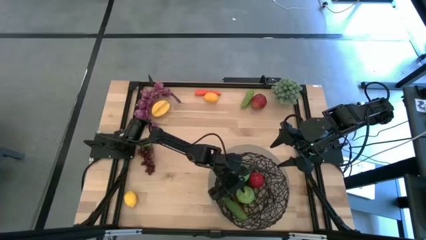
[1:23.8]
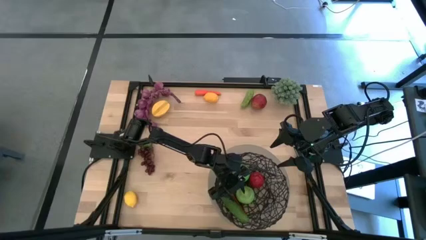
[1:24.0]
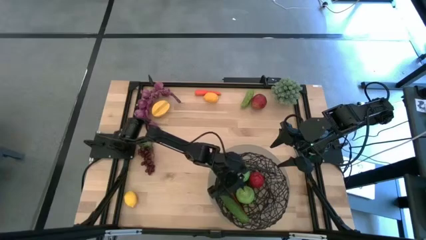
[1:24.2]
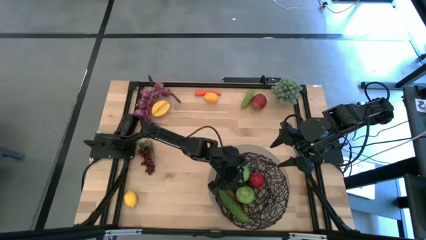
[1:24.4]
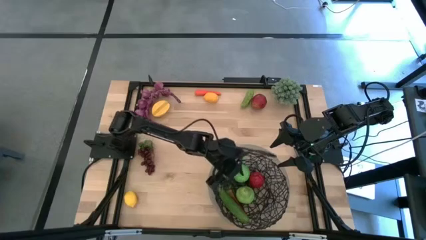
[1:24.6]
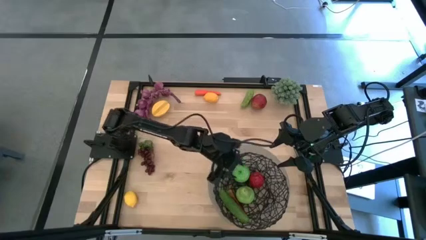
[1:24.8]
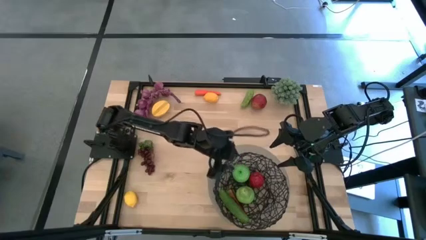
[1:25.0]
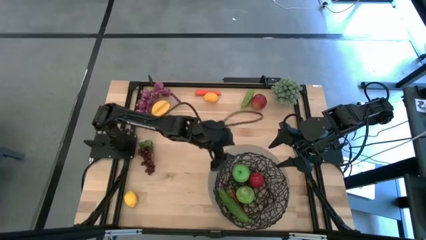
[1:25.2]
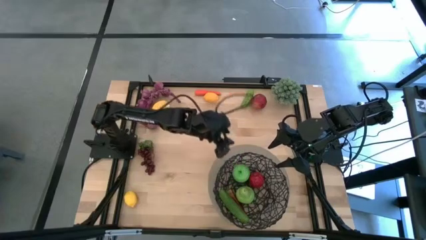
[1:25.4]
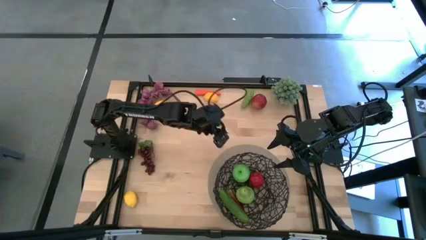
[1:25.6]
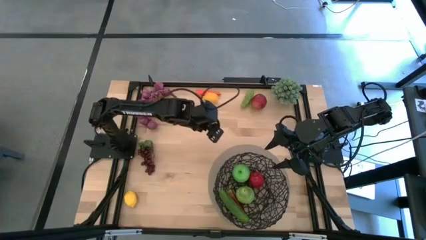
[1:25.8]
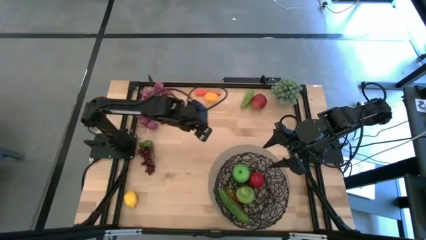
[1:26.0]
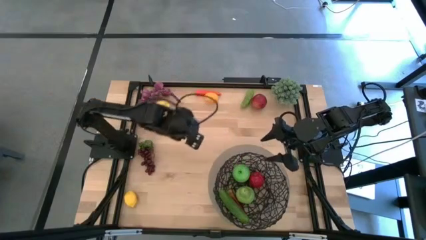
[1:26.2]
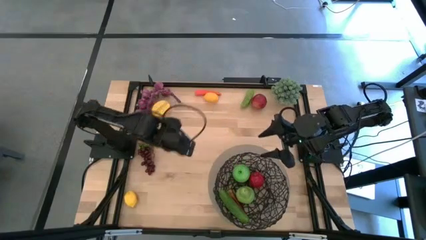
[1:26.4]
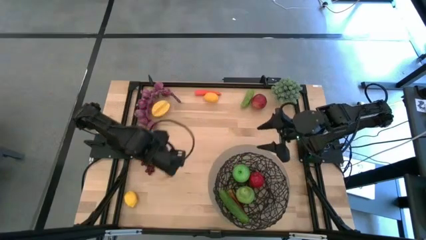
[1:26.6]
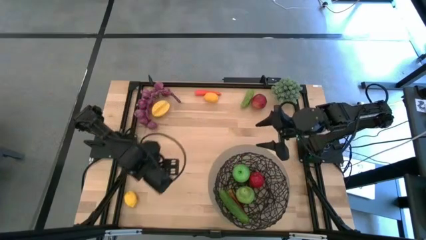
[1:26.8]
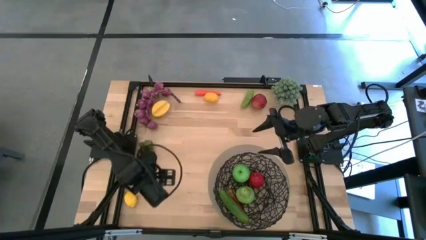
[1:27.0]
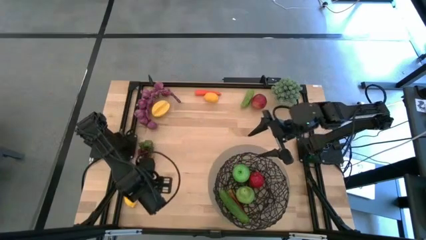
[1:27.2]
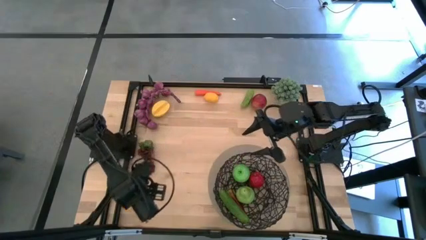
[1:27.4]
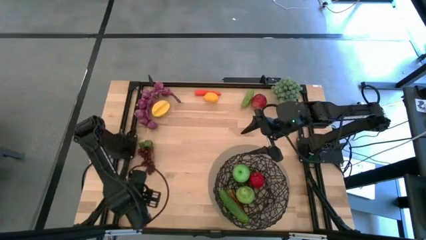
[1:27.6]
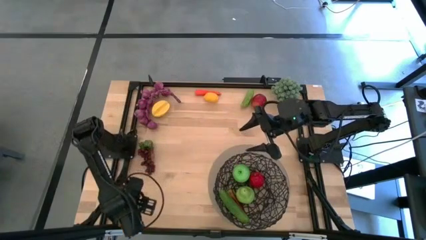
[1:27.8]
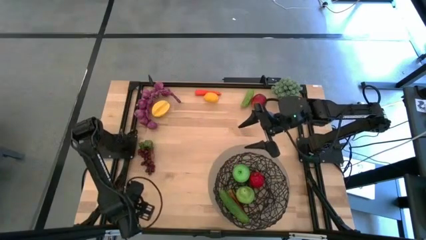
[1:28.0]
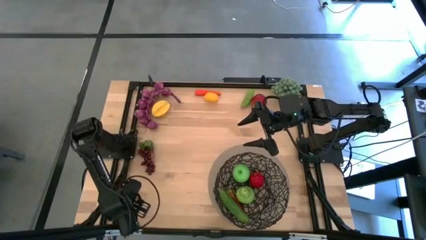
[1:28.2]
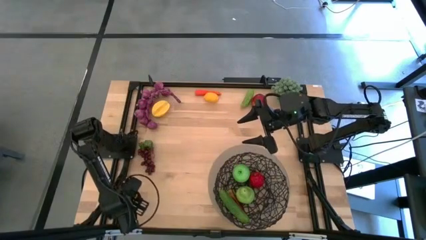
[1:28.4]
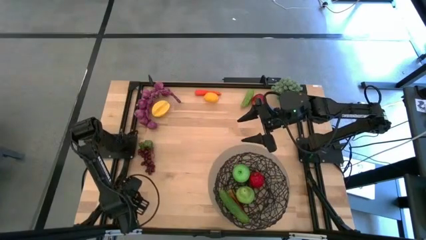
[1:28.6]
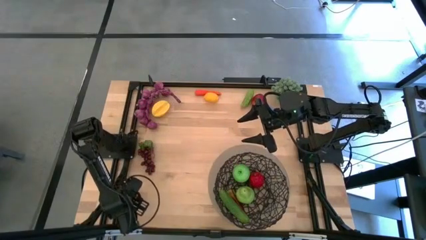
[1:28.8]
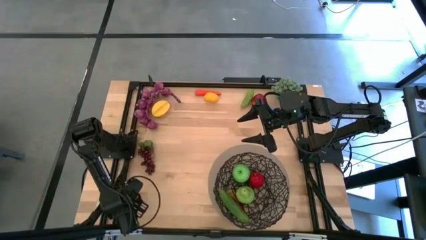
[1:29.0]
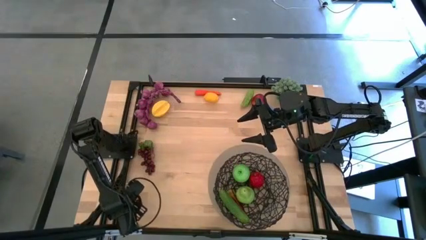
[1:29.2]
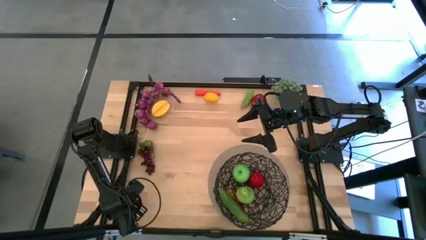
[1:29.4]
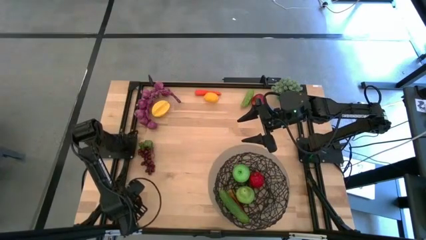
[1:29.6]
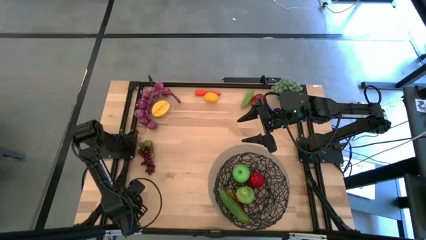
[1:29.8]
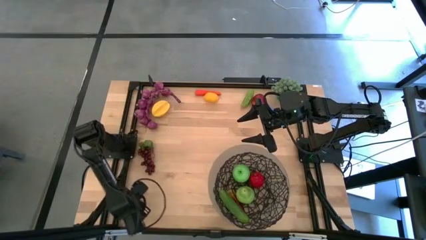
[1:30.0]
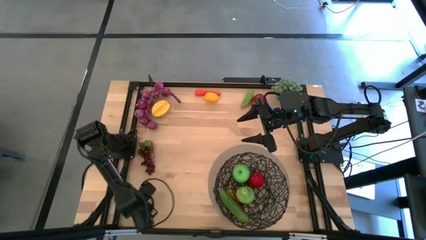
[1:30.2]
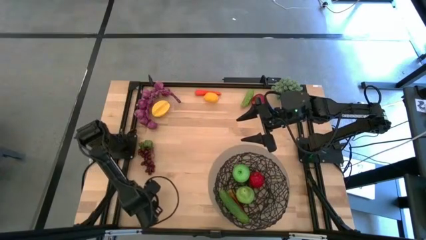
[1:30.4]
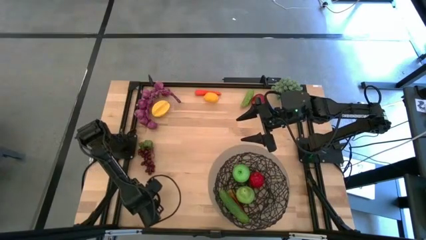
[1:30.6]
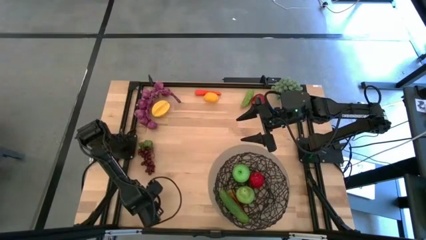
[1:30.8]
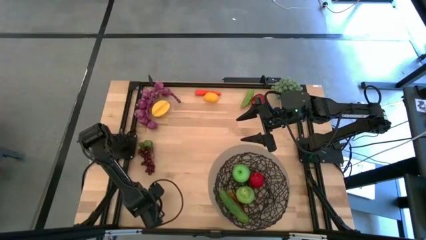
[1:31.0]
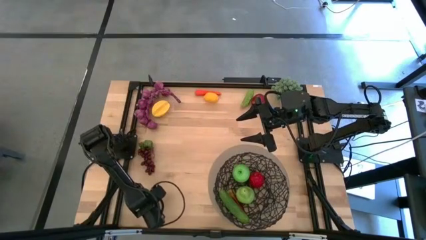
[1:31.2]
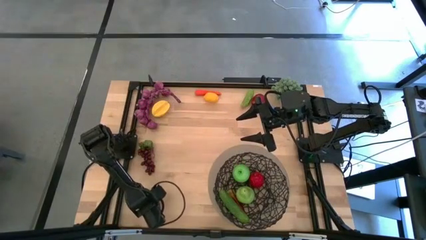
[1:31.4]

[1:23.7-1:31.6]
Task: Build produce basket
Put the bottom yellow lemon into the wire basket

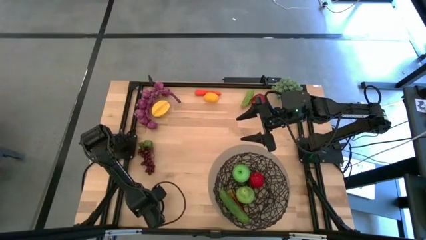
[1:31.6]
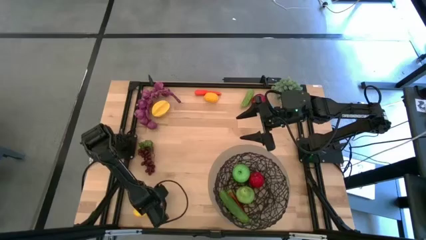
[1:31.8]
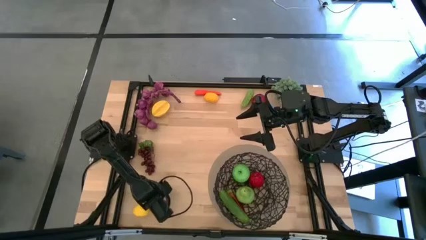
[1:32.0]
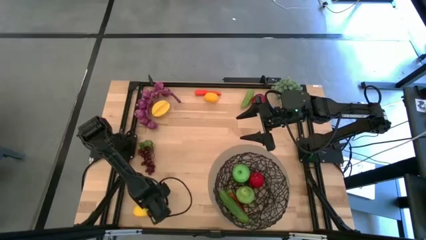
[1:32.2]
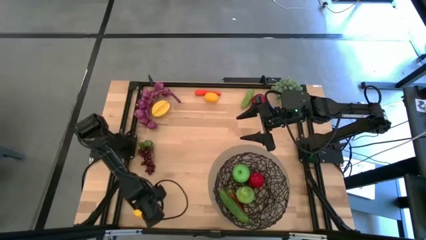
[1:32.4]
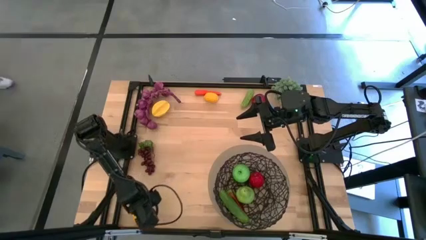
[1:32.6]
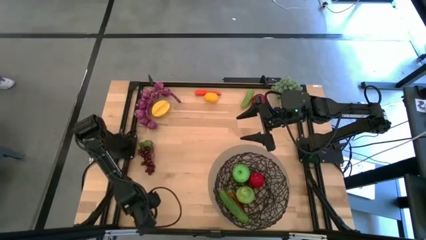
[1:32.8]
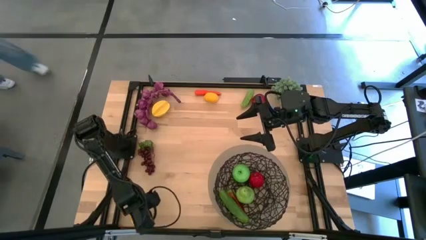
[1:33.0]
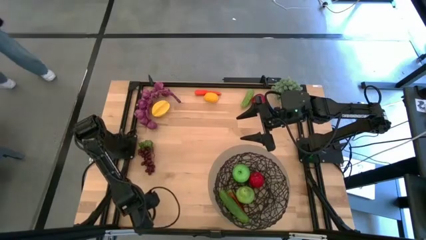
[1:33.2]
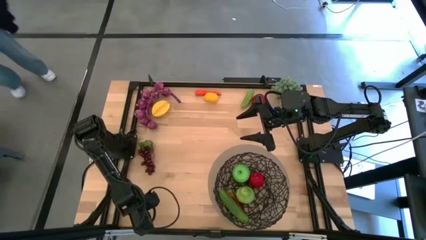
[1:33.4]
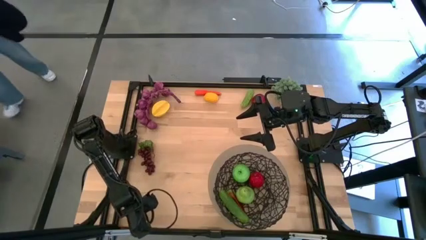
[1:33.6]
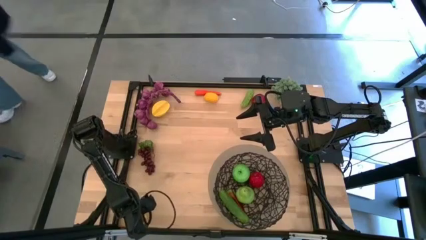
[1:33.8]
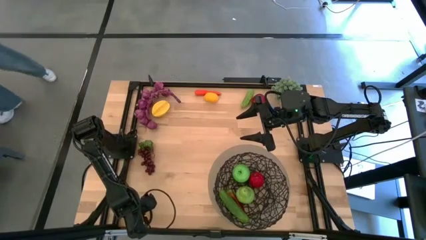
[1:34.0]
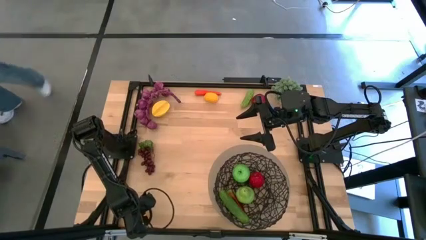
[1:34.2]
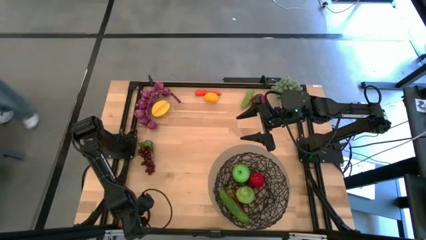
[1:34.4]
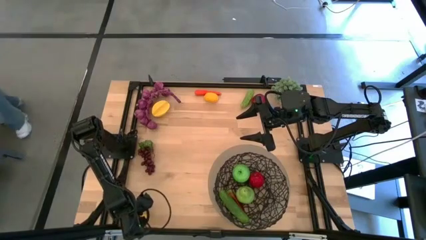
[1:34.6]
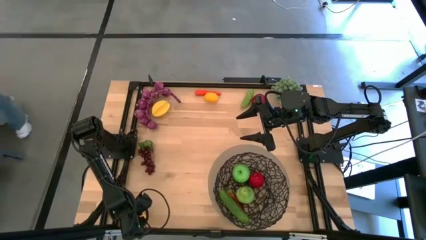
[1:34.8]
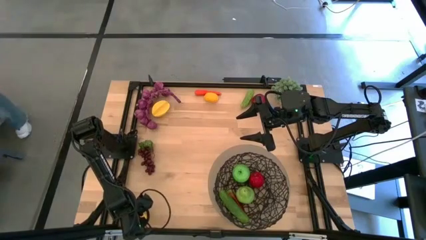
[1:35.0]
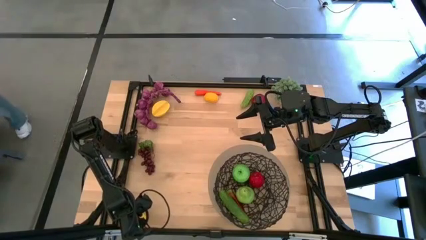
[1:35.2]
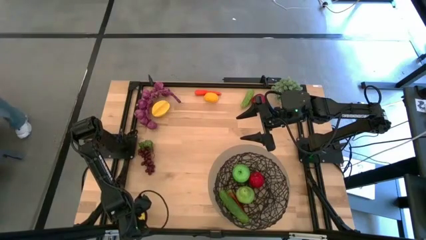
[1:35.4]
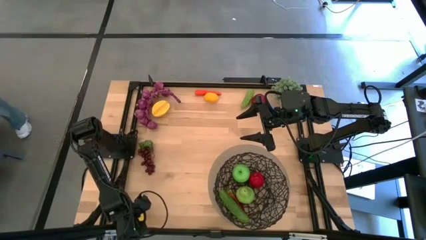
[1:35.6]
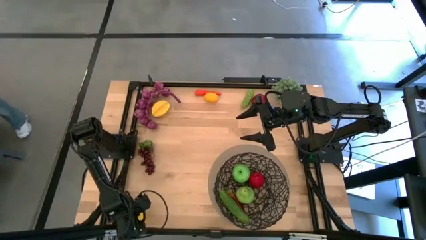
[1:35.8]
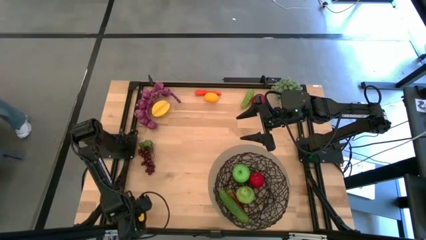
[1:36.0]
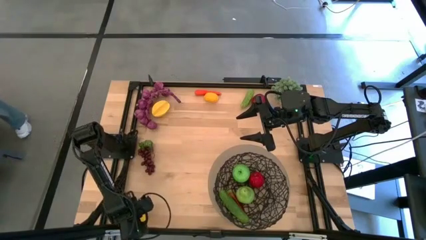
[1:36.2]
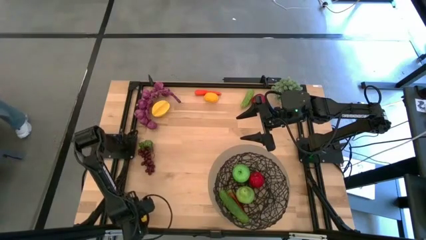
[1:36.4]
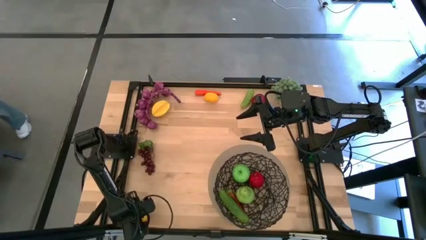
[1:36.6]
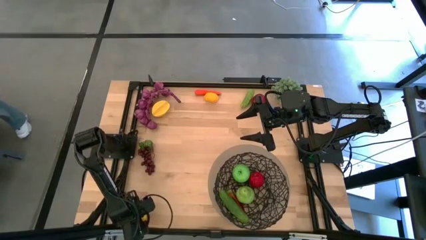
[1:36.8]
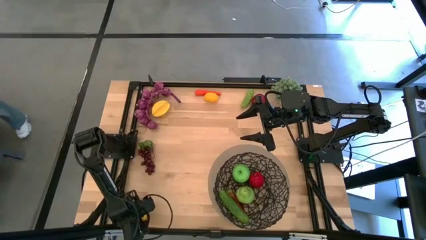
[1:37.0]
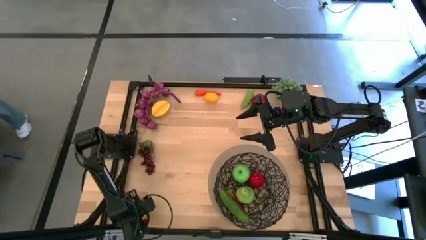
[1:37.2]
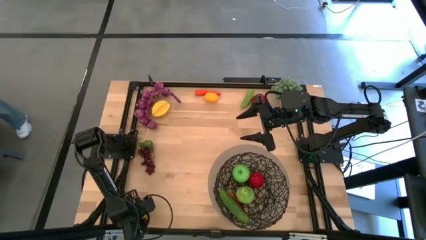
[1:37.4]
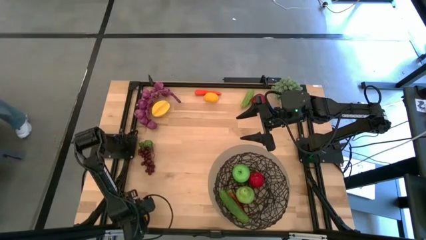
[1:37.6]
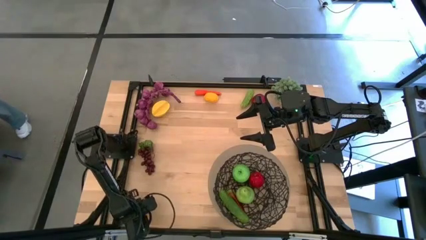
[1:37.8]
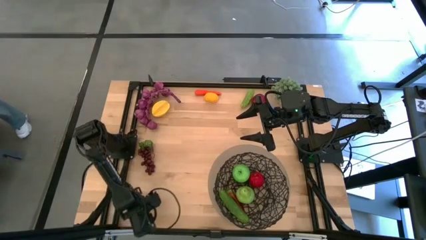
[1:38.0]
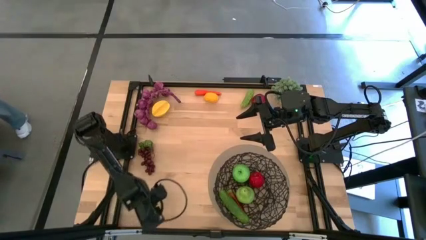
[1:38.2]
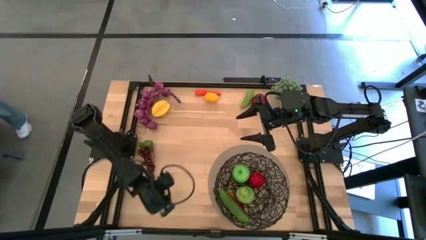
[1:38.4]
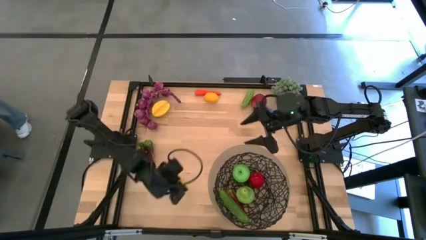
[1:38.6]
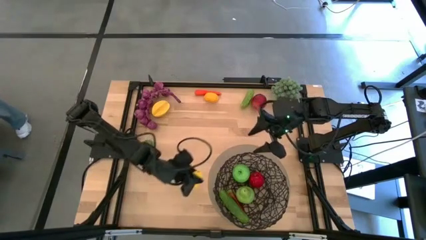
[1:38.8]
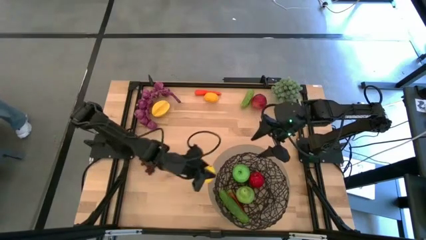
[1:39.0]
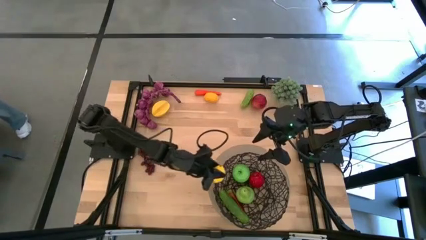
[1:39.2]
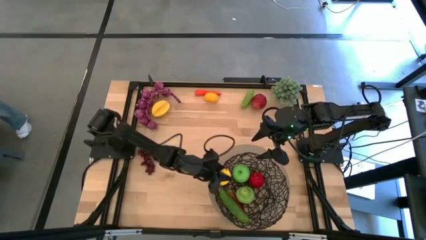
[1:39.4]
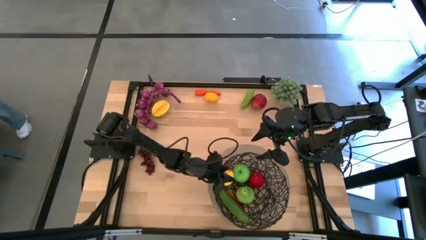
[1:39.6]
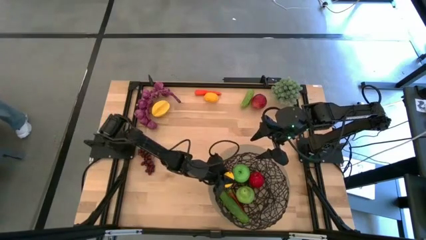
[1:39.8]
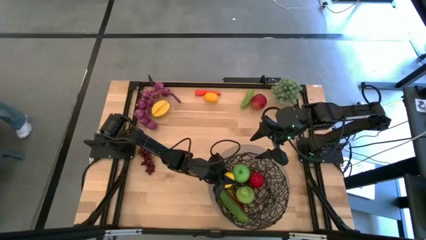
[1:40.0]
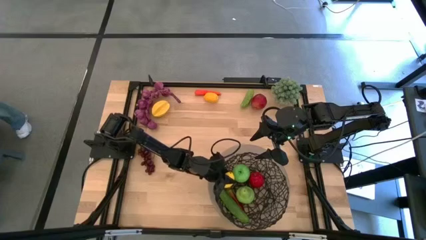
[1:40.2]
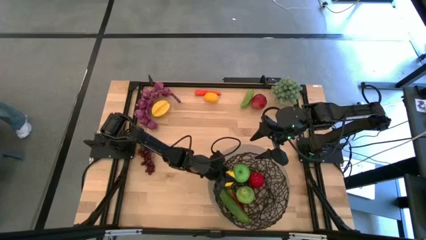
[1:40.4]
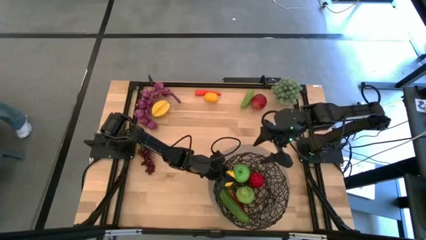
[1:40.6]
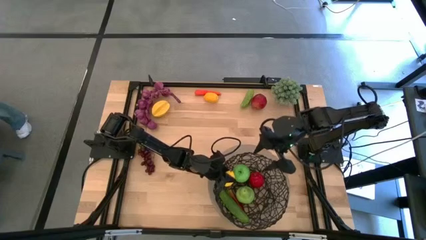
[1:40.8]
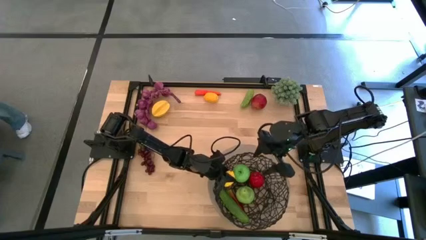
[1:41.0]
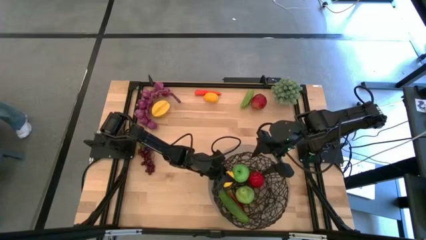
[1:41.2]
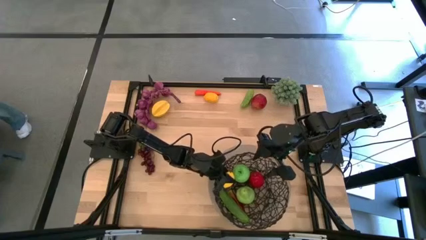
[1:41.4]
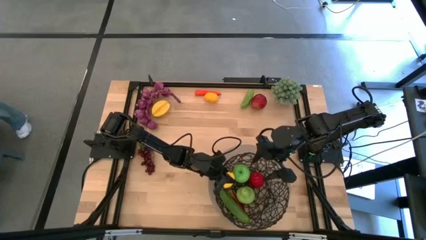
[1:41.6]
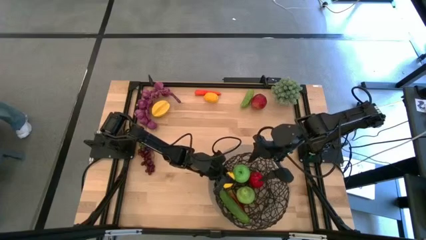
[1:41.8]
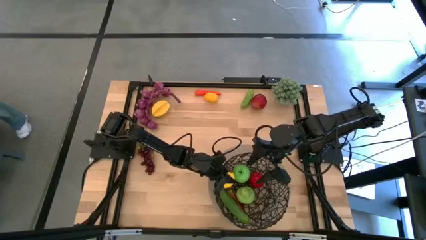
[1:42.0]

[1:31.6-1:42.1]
Put the bottom yellow lemon into the wire basket
